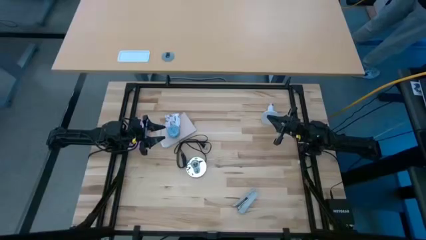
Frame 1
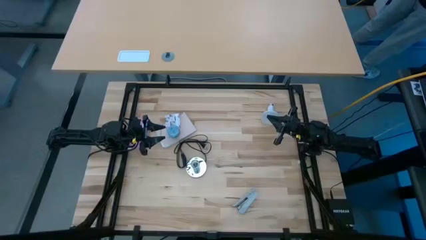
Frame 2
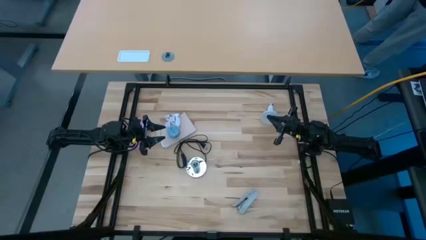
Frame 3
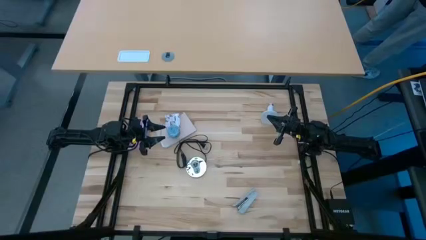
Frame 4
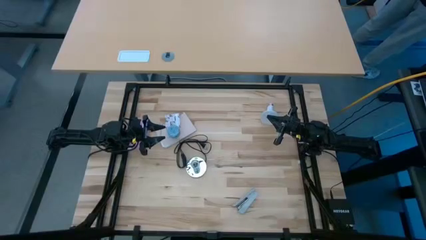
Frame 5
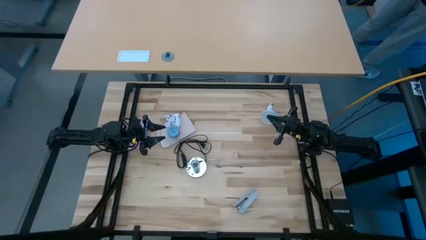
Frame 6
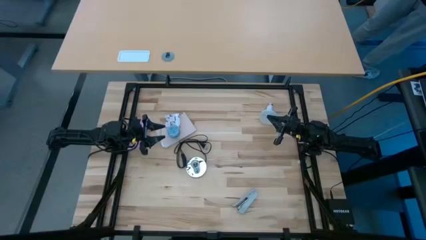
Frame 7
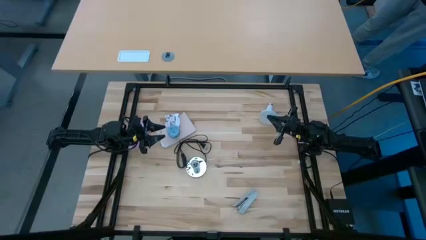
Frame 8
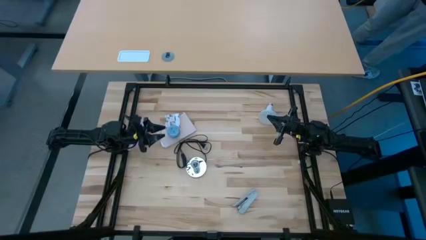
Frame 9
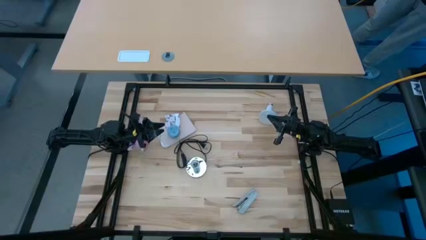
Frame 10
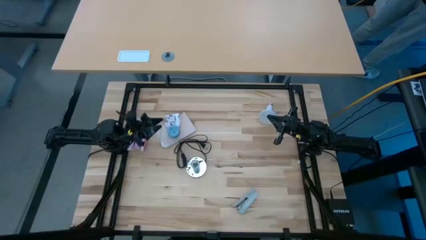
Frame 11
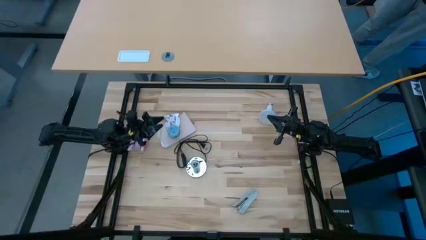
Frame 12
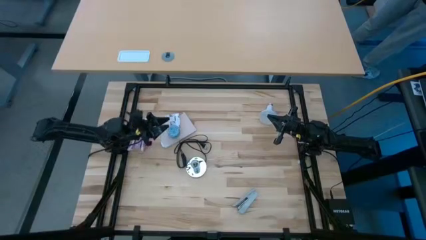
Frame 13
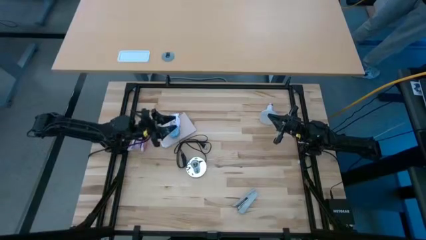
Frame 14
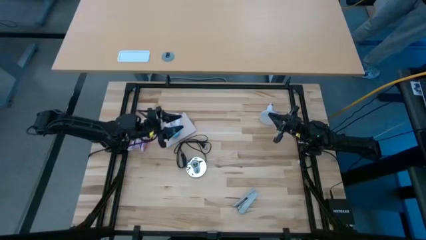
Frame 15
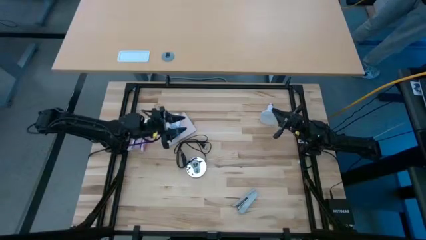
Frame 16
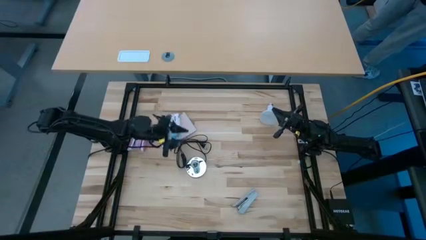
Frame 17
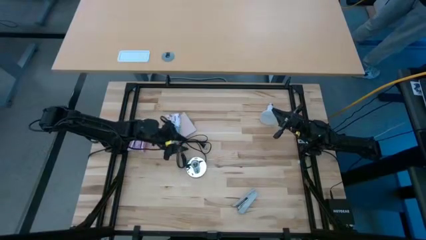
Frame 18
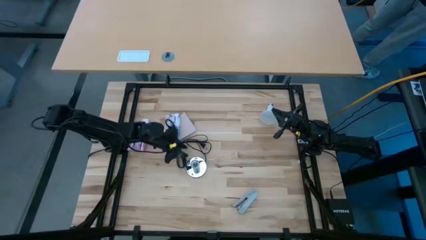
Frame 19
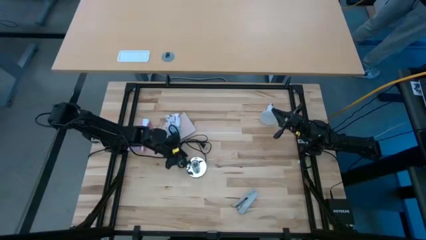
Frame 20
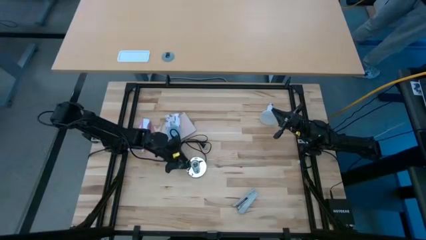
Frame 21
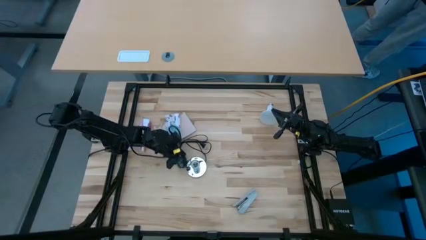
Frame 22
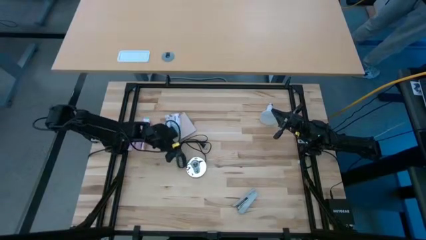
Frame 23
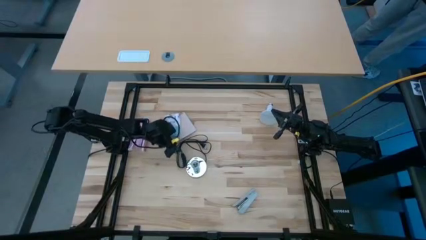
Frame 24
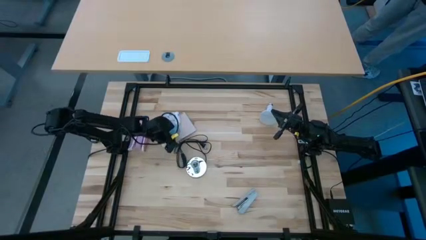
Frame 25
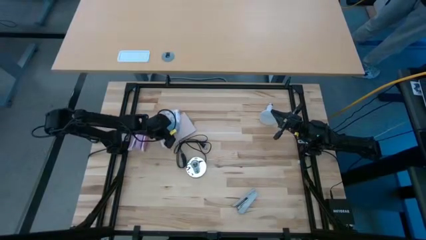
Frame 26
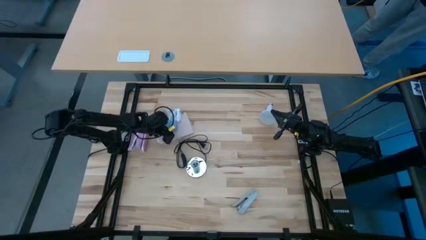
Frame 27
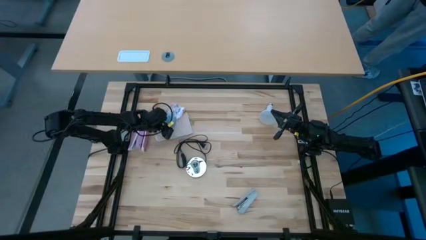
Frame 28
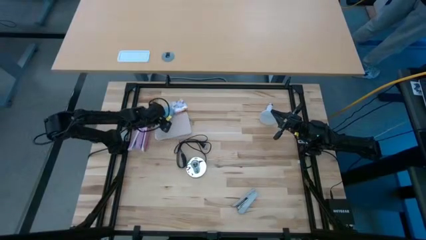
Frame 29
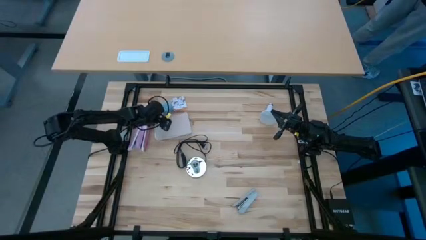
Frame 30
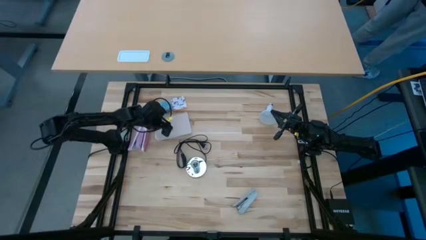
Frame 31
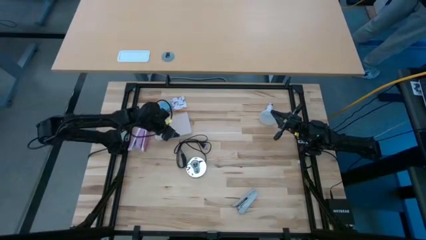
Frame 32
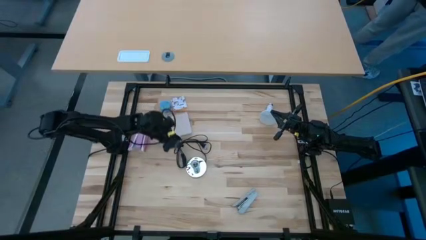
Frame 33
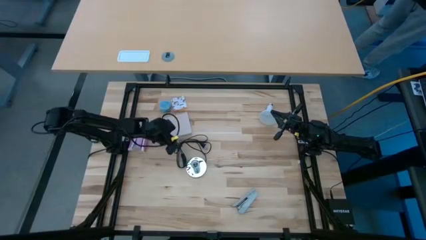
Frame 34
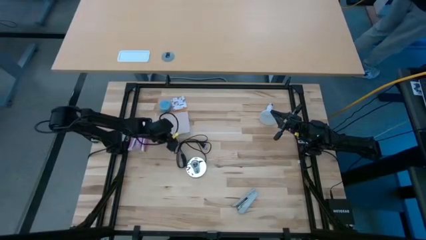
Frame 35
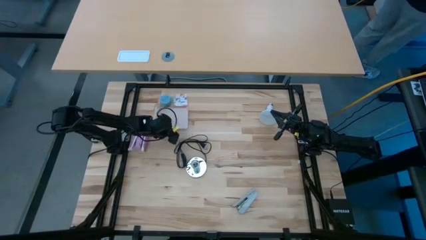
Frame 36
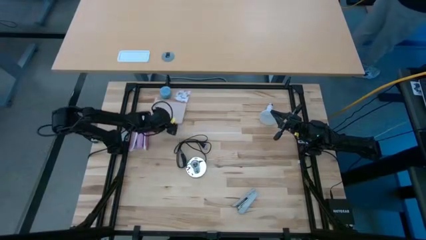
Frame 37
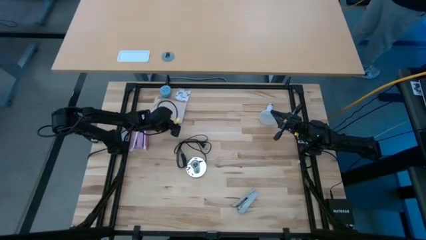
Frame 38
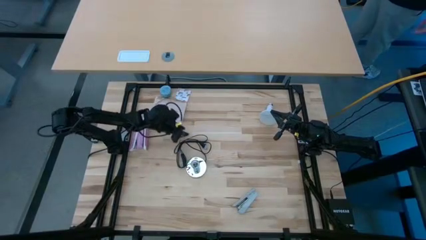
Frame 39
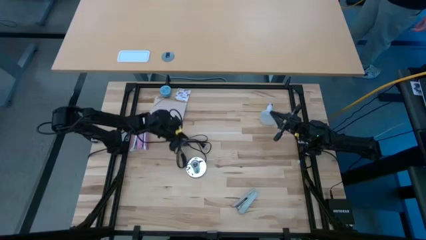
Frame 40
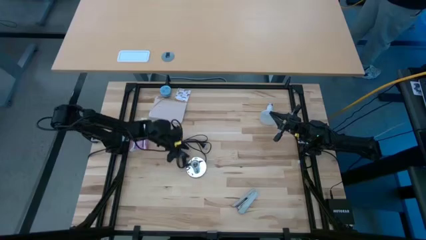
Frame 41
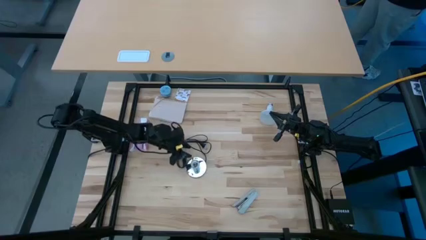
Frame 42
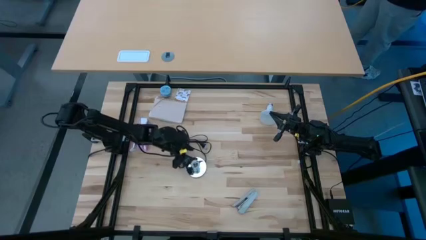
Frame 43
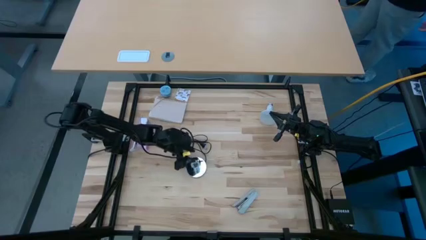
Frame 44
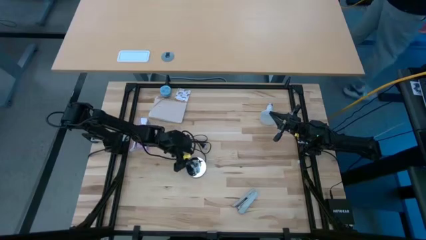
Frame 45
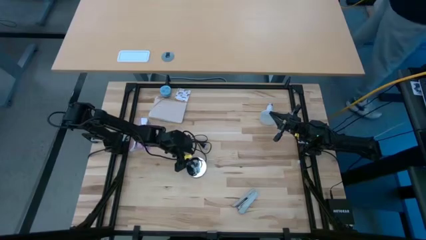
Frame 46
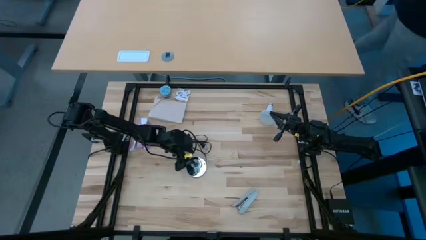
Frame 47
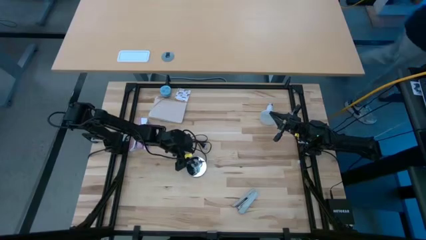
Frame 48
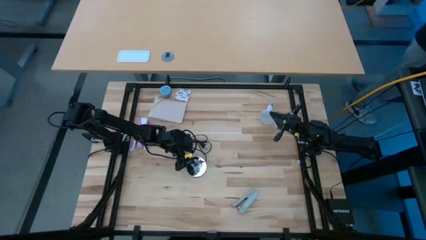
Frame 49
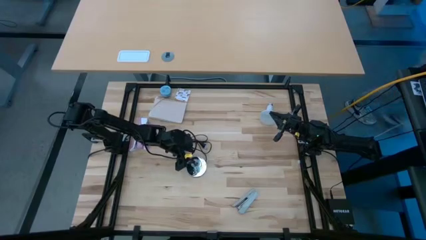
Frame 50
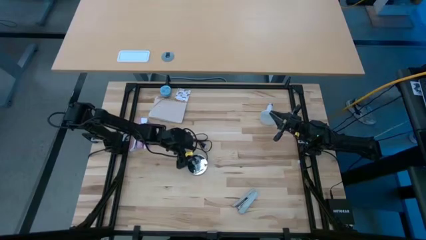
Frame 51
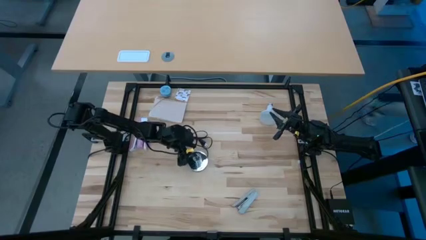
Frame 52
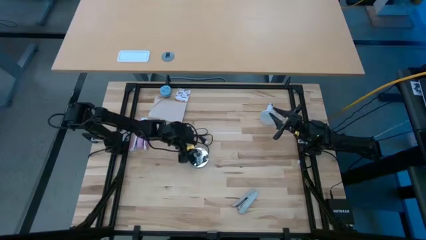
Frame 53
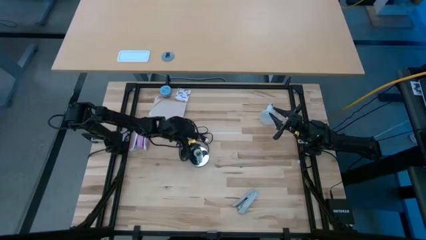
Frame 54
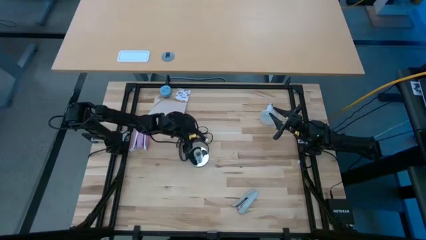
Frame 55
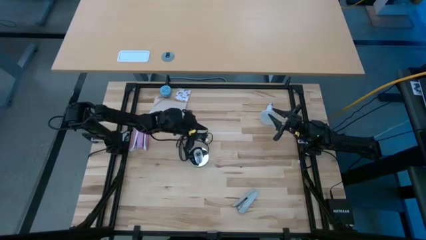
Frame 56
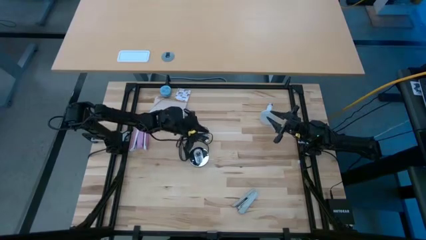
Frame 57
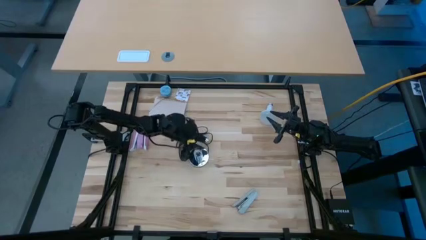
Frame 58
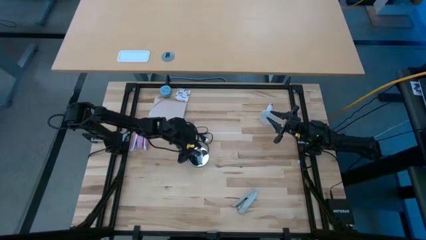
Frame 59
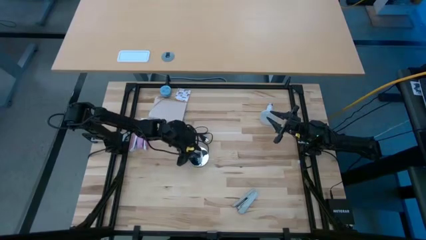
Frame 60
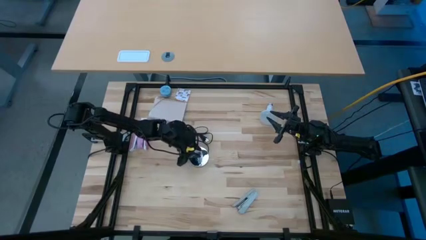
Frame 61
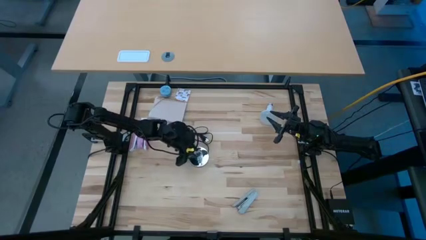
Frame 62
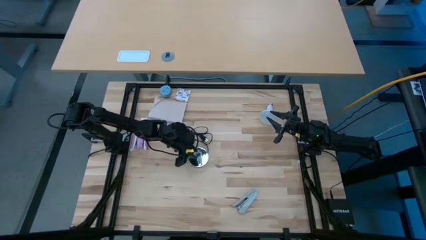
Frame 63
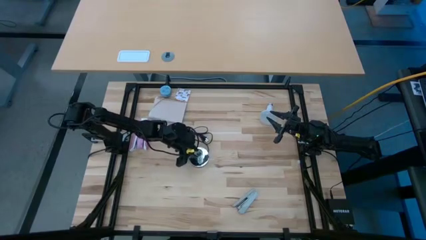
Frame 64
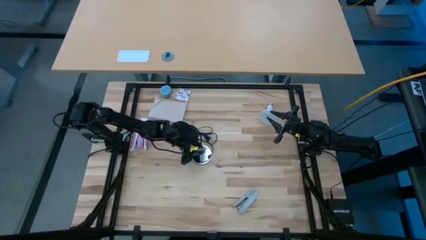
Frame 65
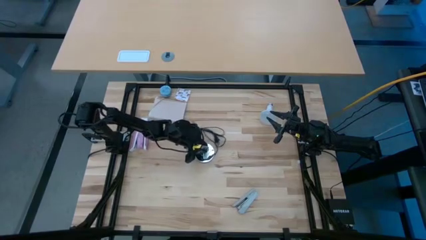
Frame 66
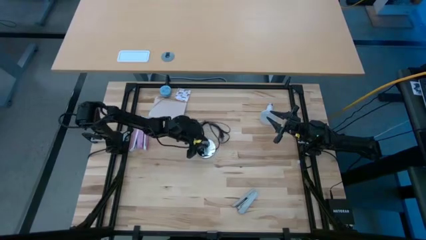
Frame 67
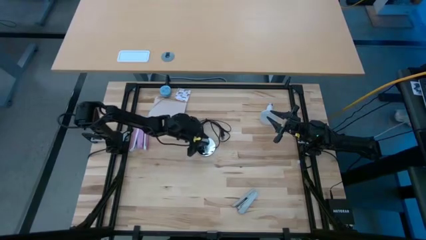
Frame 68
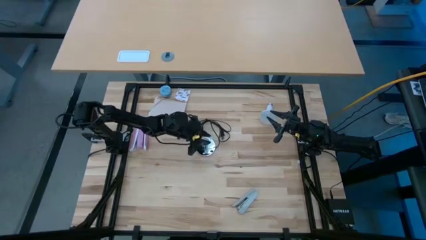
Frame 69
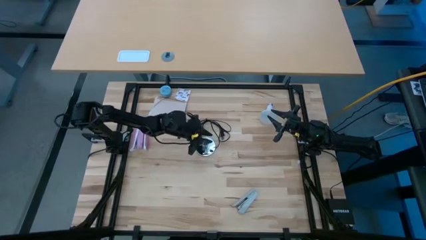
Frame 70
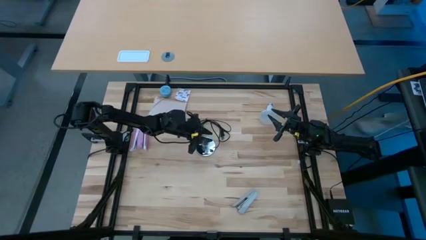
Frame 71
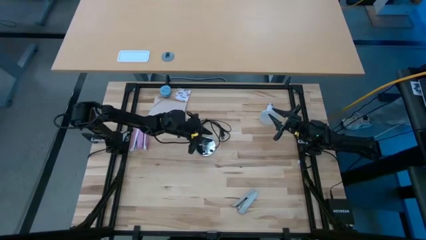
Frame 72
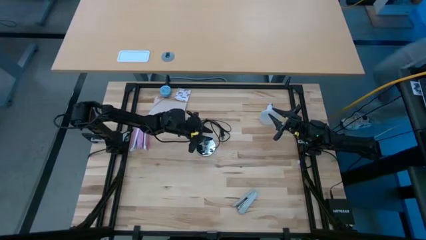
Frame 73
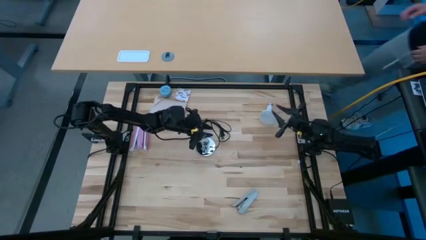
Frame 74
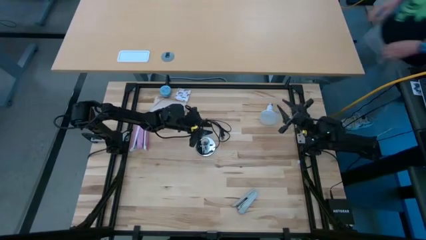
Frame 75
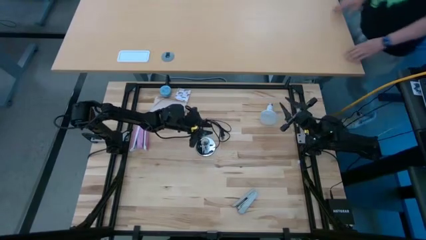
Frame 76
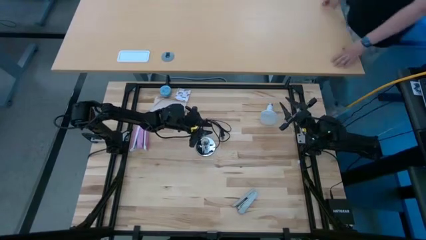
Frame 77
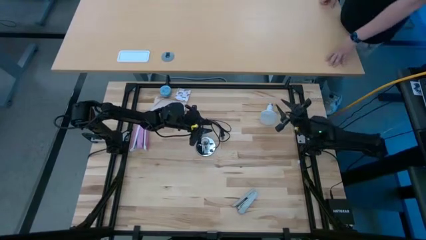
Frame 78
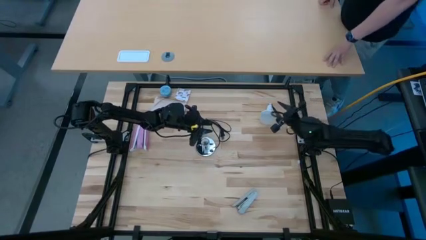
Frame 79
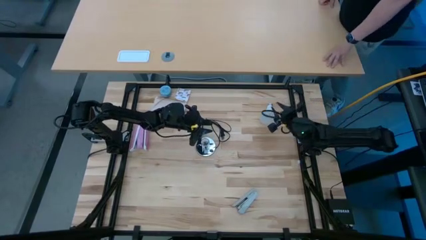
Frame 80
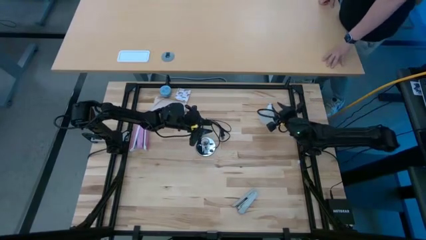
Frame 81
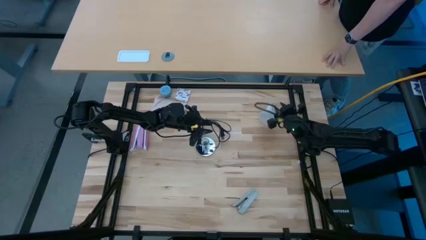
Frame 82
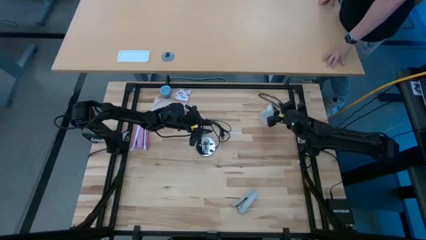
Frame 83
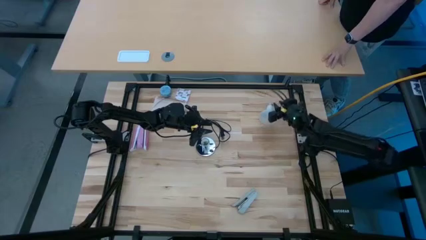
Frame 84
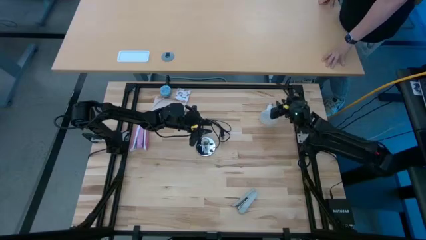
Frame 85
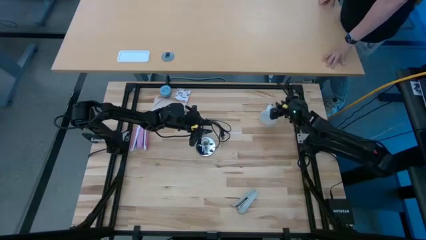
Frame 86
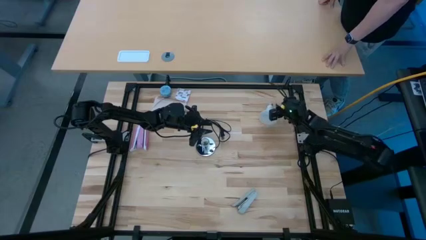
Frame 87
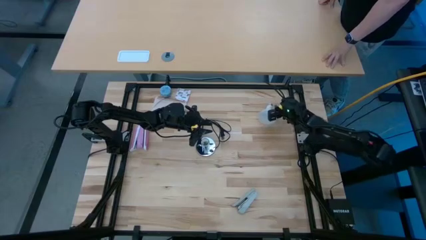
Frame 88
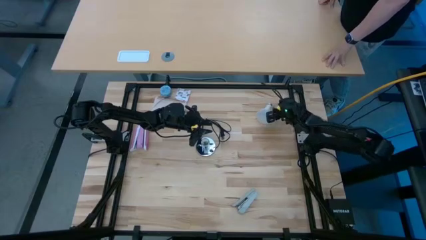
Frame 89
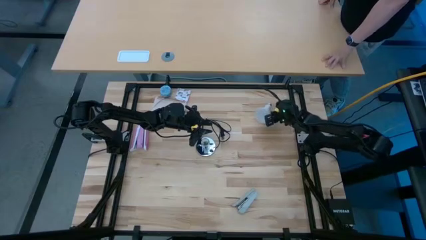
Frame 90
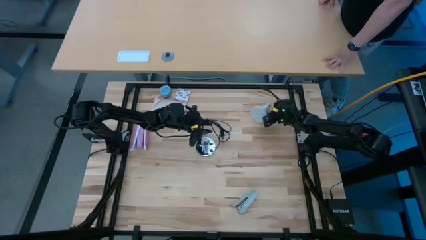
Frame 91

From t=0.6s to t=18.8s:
Task: Screw lightbulb
Insert the light bulb into the lamp
